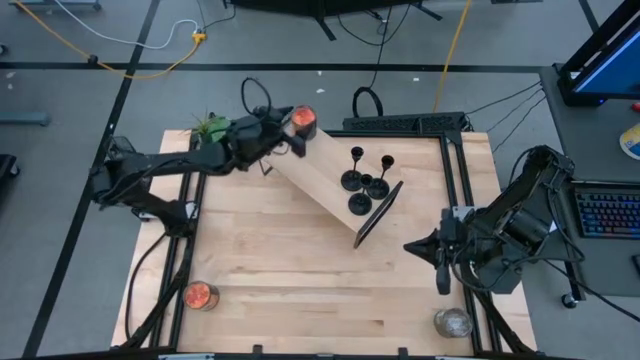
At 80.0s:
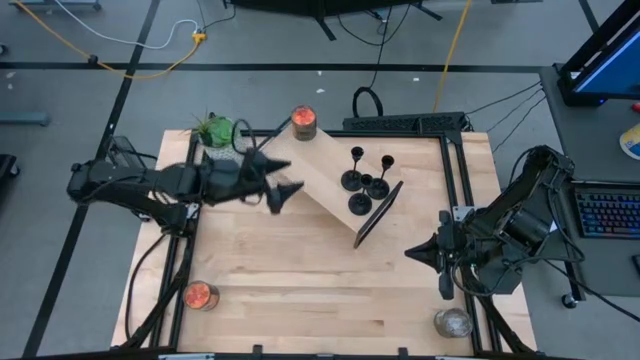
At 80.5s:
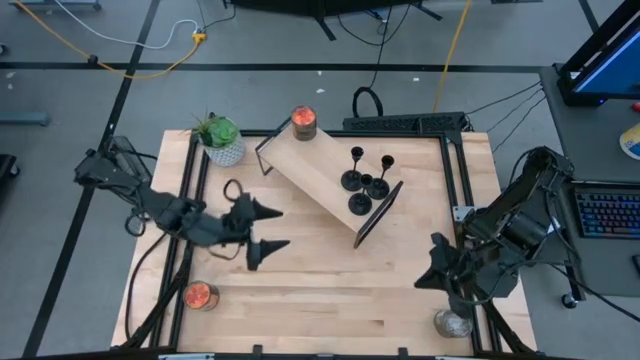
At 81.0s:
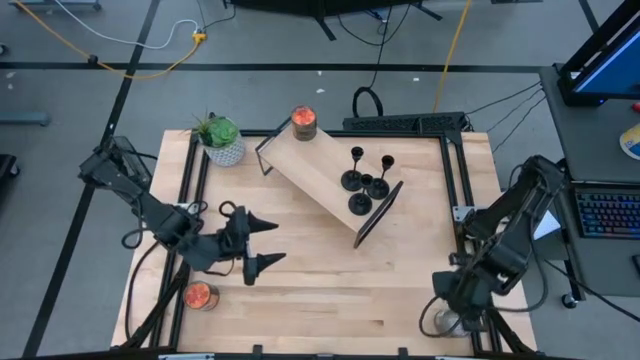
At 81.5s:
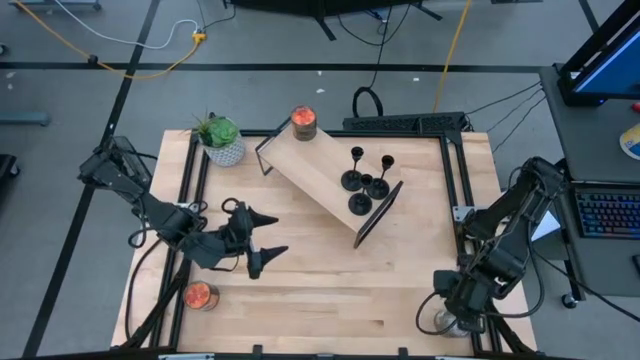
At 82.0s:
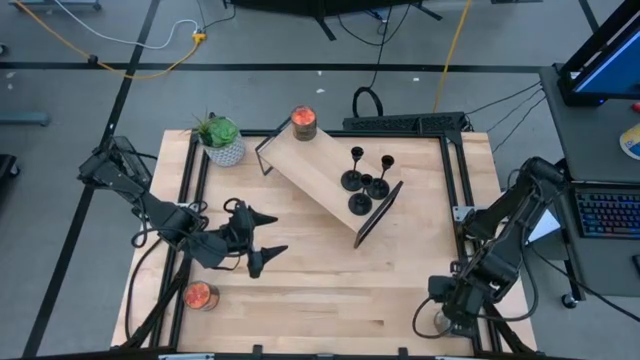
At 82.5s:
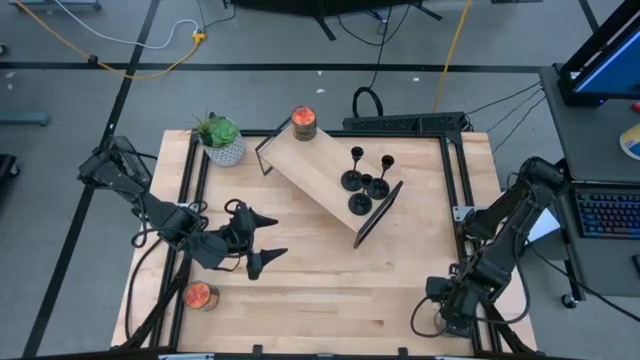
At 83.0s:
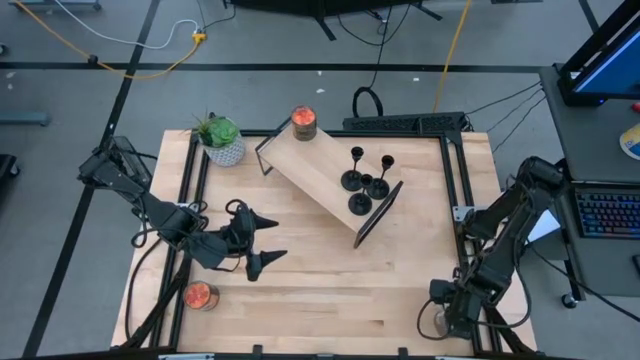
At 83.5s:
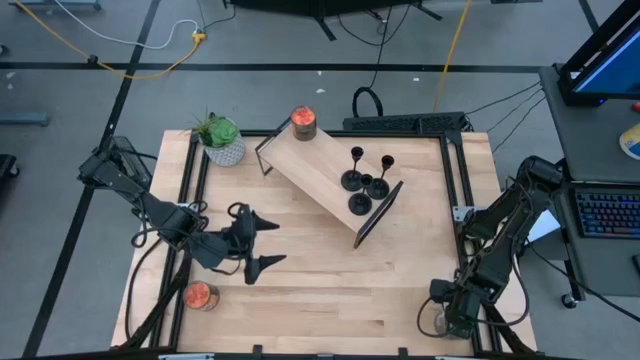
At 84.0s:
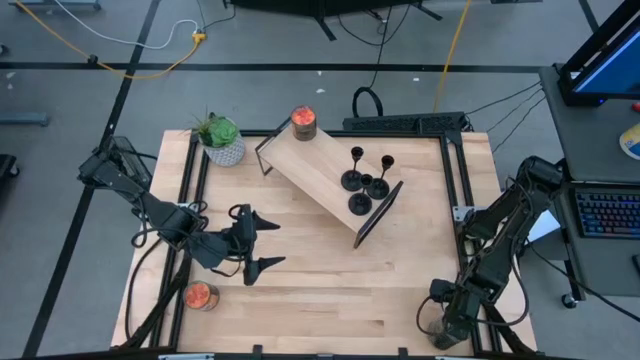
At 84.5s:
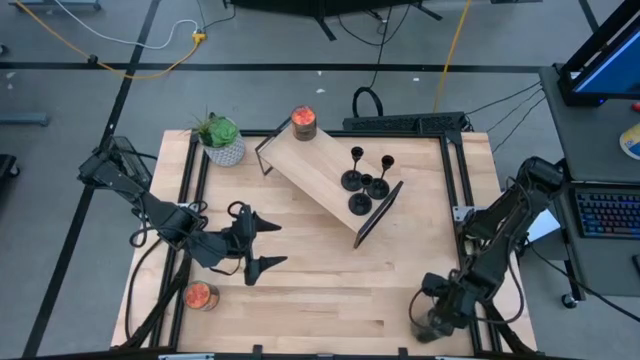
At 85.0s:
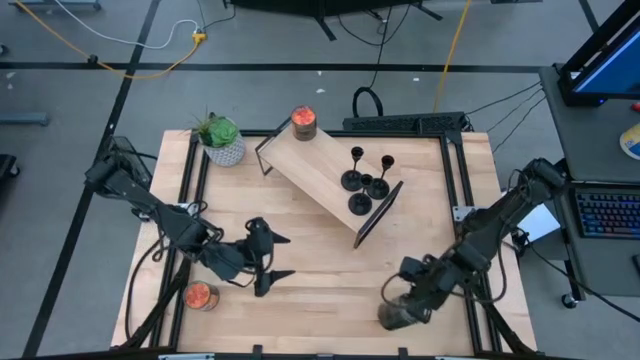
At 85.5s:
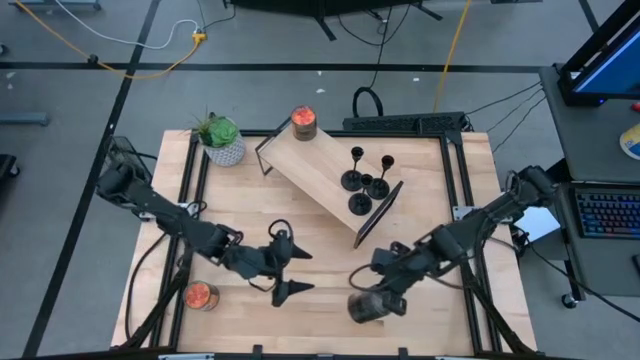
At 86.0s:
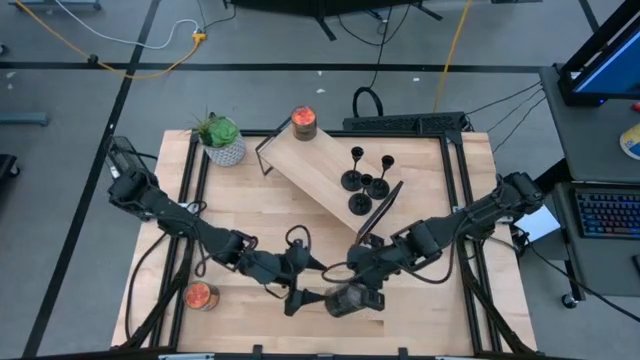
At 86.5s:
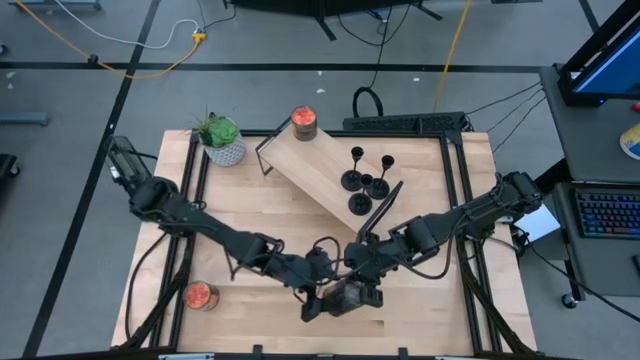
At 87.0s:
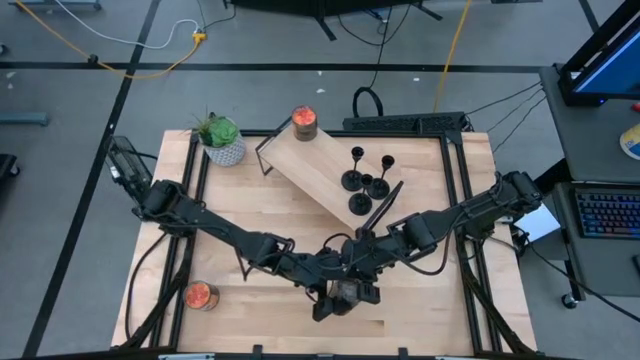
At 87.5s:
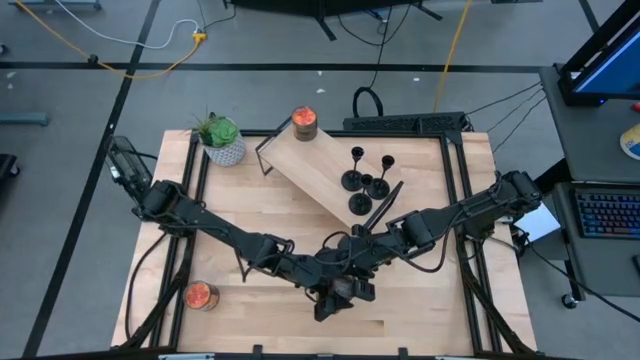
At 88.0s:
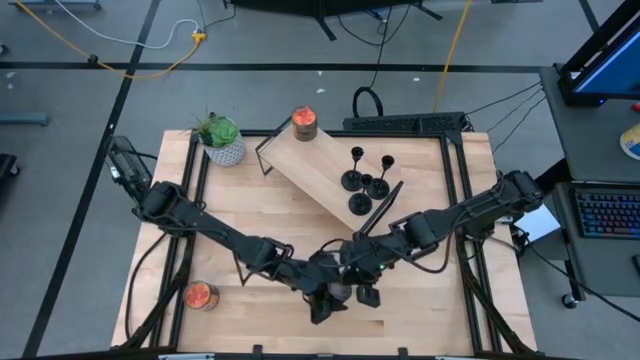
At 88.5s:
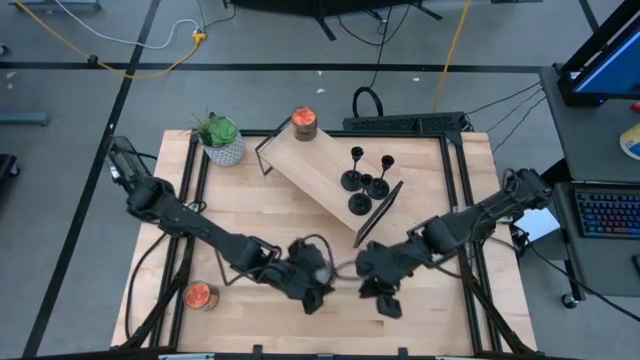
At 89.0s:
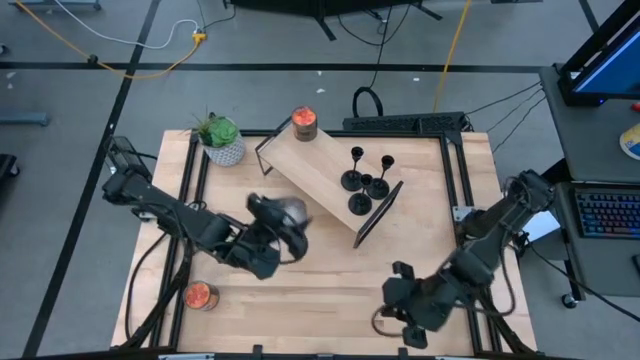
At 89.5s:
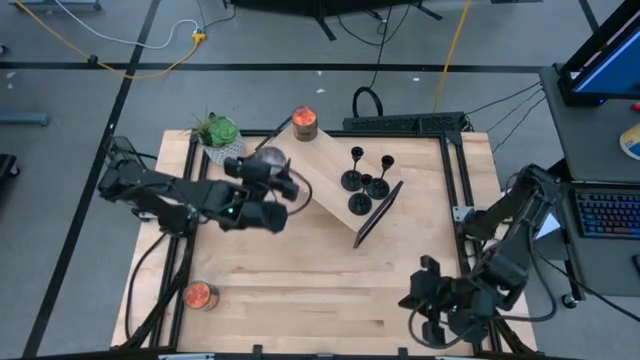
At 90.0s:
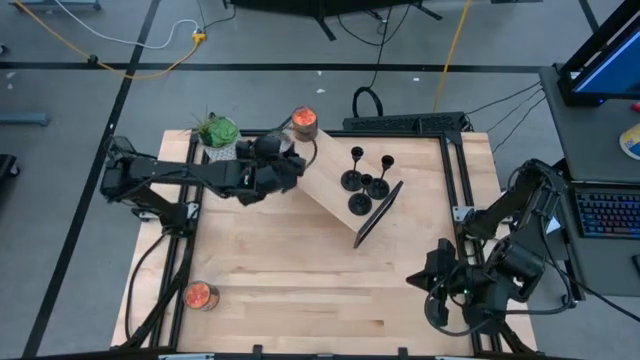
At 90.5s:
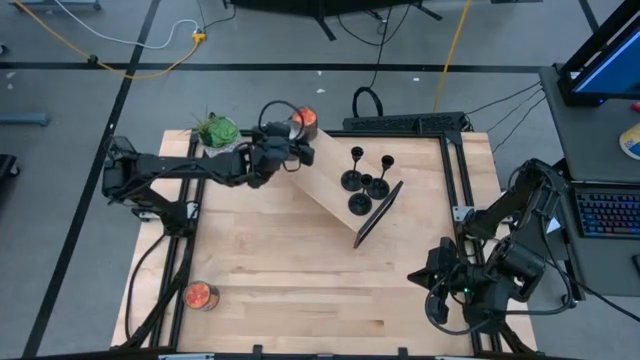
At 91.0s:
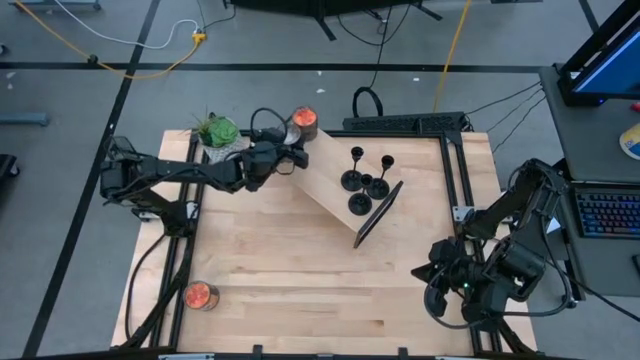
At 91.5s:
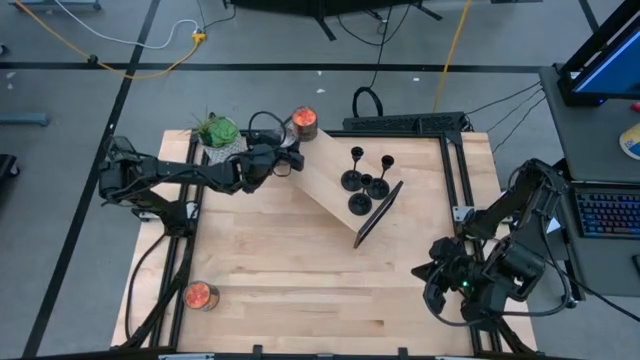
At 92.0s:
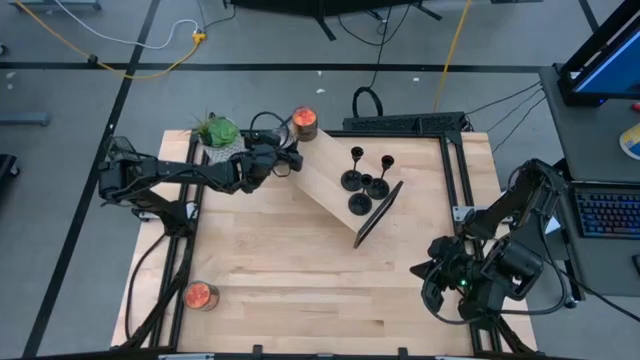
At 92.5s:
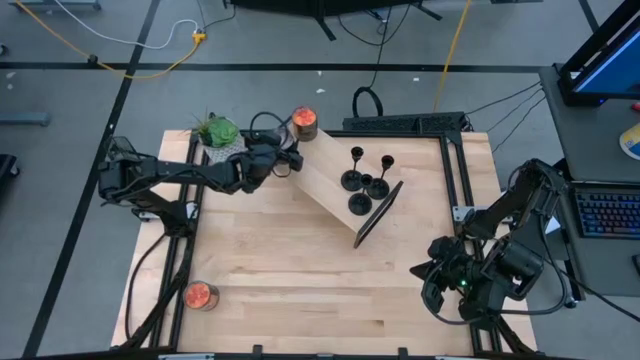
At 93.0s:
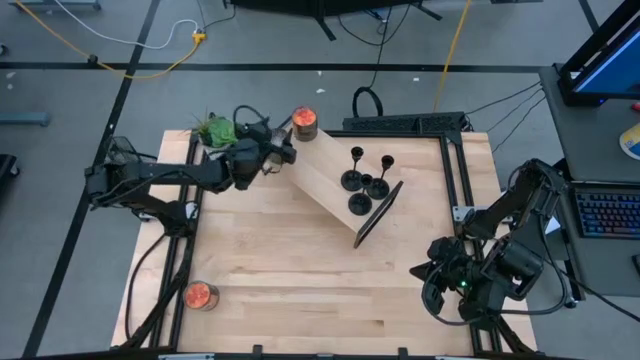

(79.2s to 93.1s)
Task: Pick & Place candle stick holders
Put the brown scented candle on the shelf

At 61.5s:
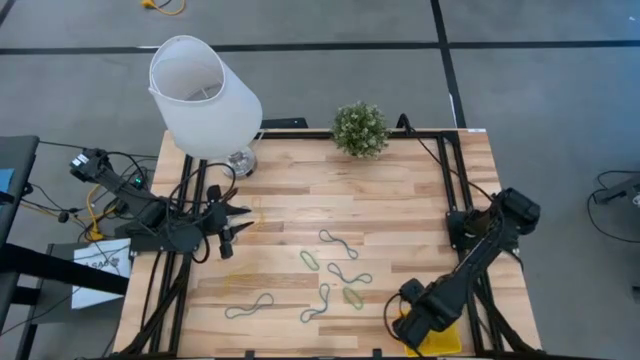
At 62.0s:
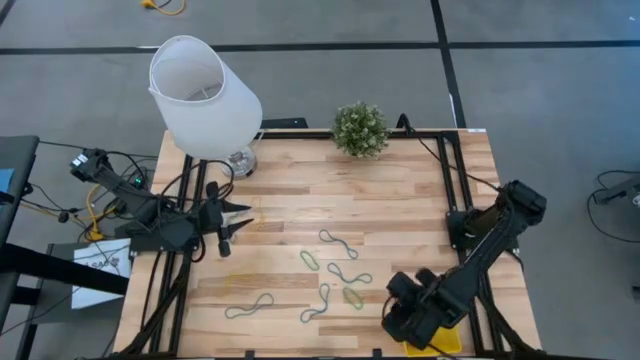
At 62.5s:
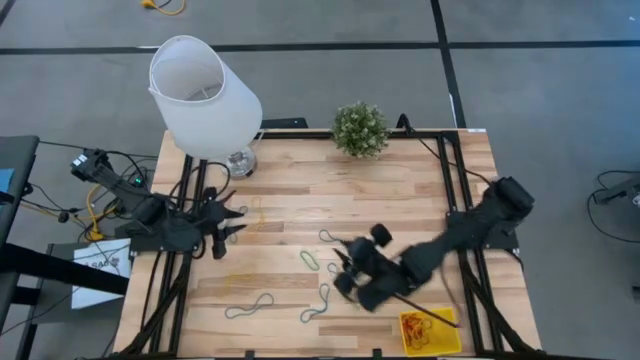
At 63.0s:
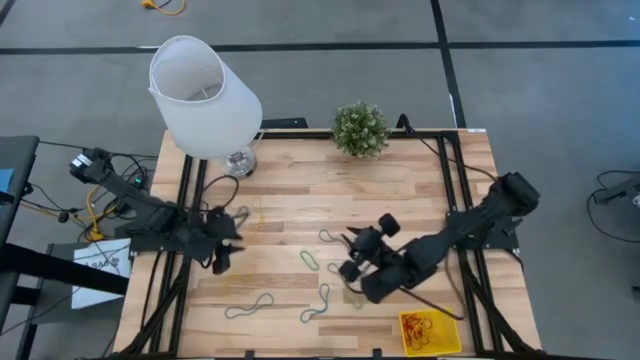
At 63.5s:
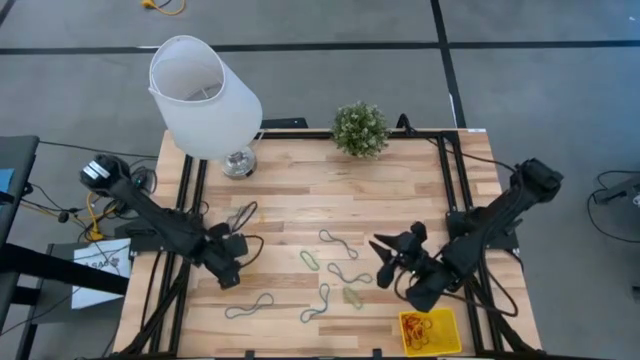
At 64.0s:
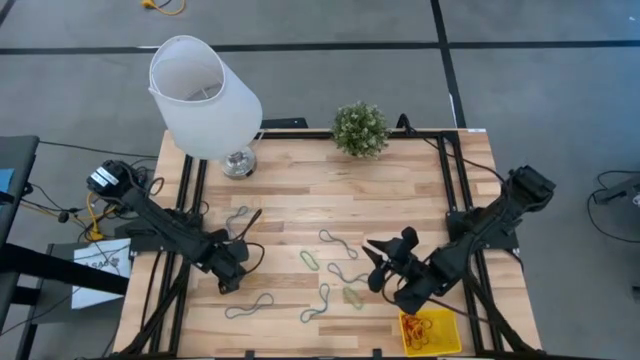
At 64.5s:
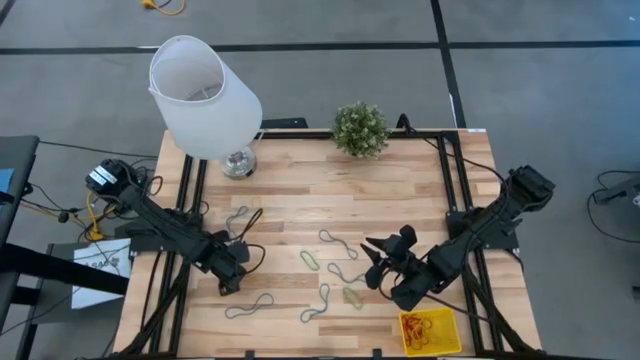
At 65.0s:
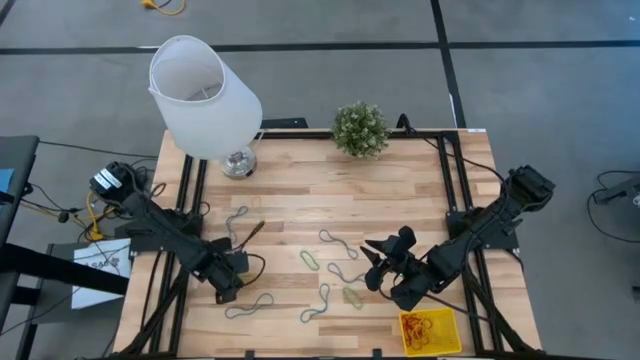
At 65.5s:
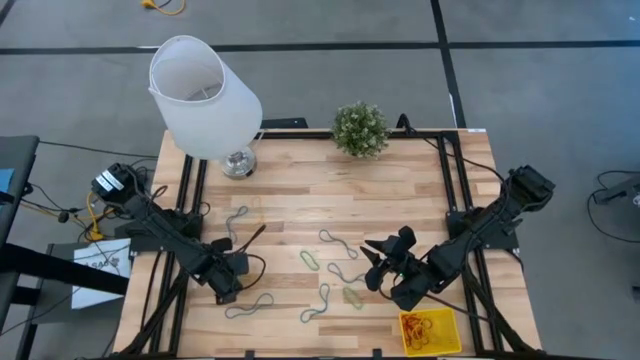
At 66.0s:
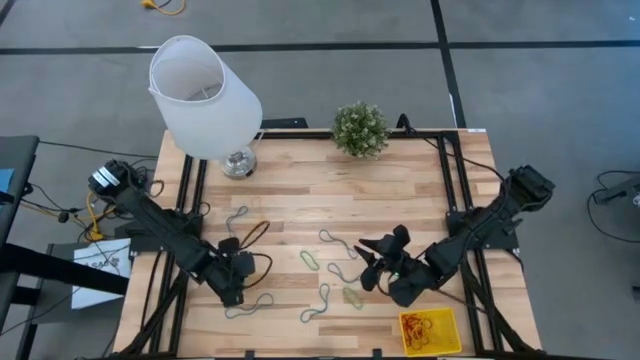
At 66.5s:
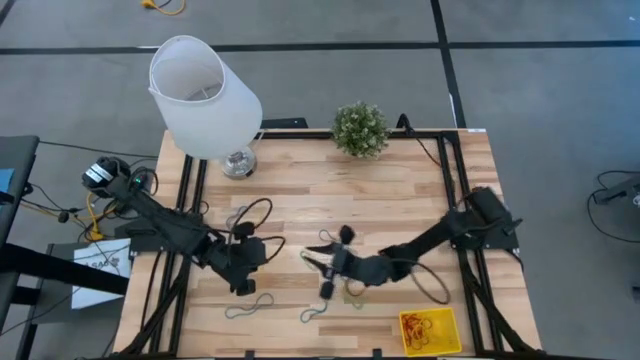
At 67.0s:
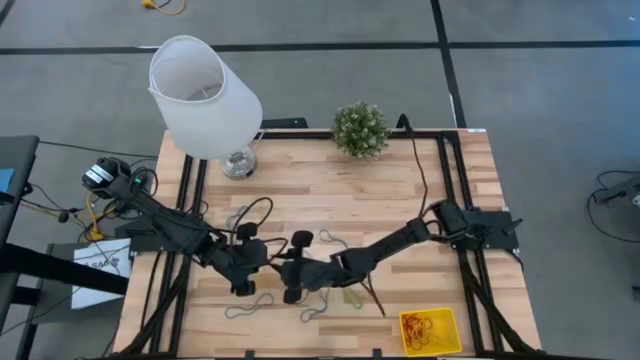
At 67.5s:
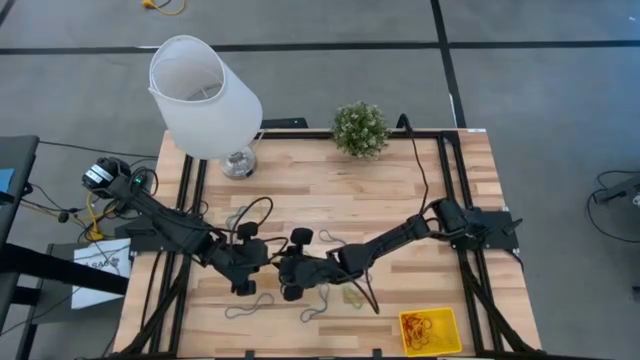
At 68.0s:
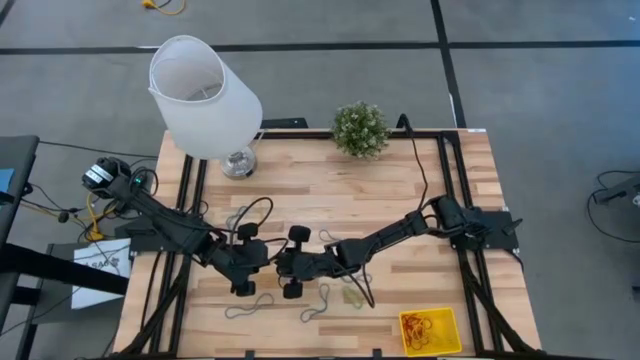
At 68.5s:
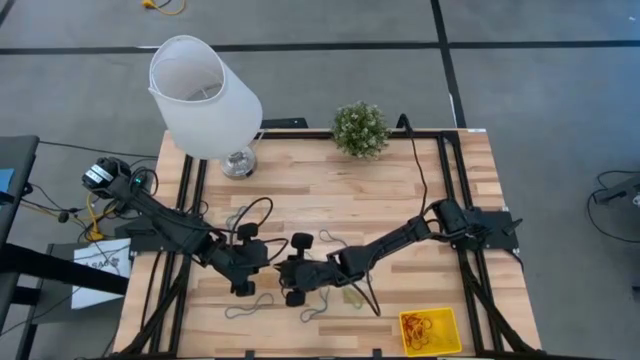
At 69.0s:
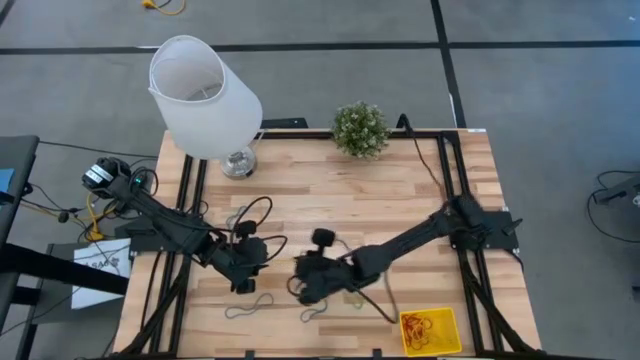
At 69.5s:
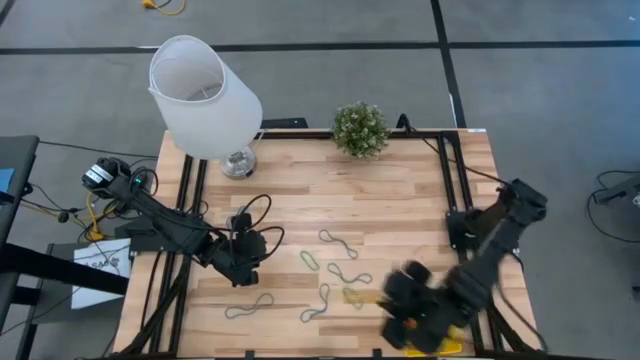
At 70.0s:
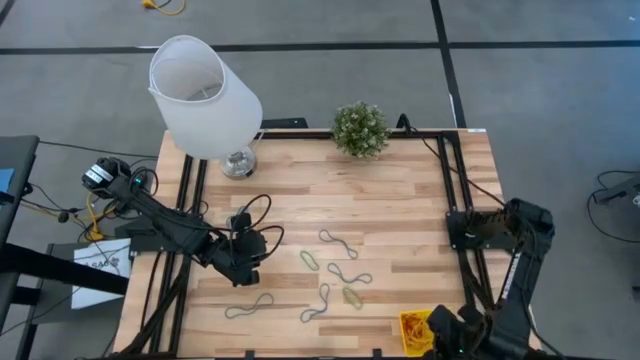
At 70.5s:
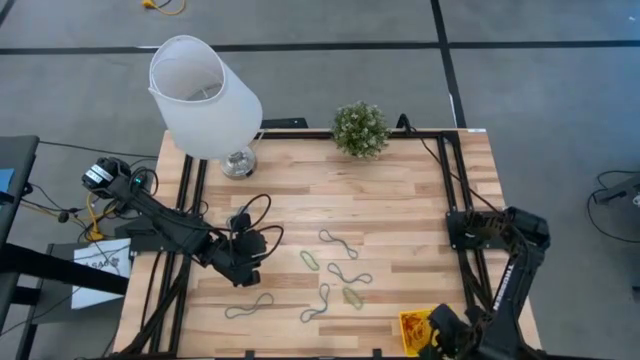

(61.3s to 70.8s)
Task: Pick and place rubber bands into bin
Put the yellow rubber band into the yellow basket
